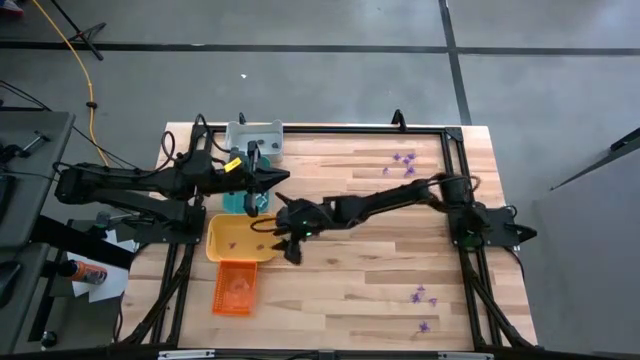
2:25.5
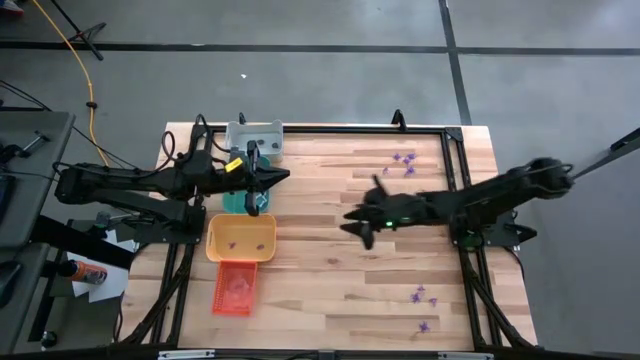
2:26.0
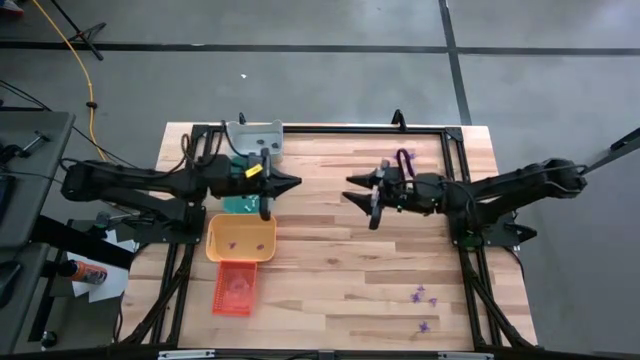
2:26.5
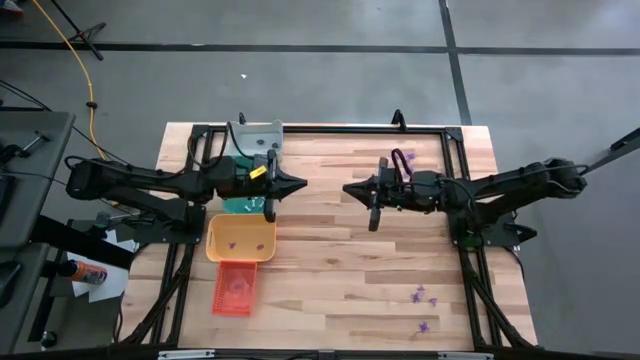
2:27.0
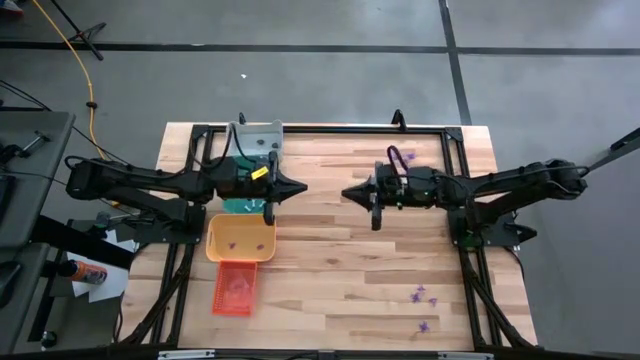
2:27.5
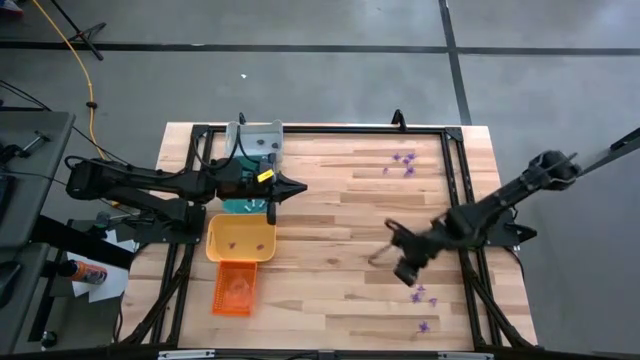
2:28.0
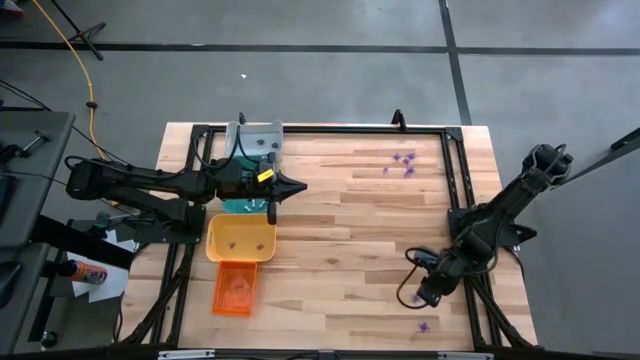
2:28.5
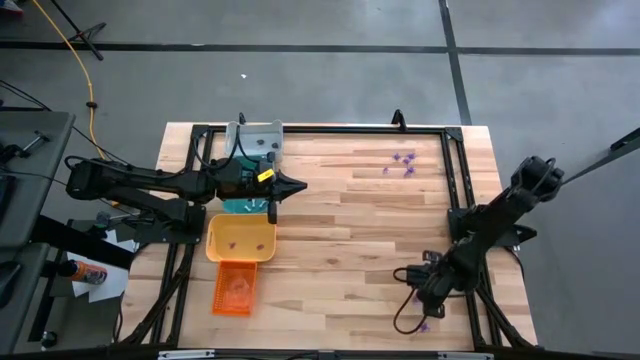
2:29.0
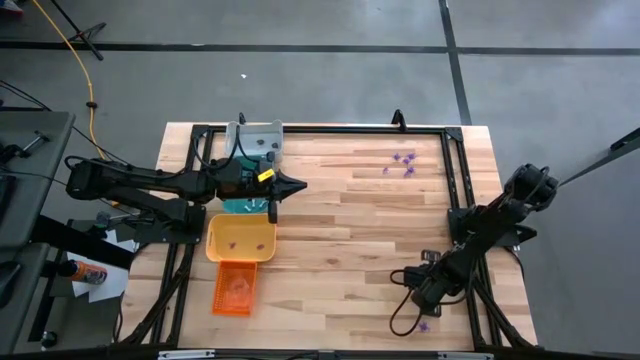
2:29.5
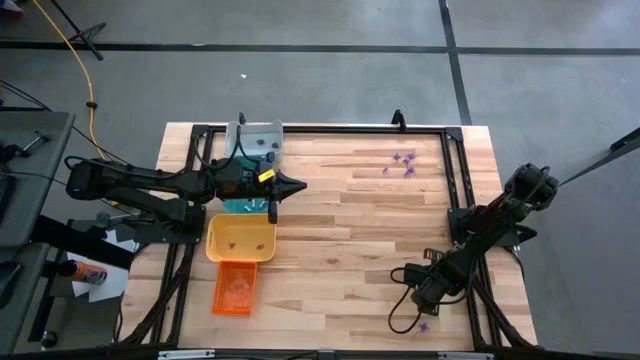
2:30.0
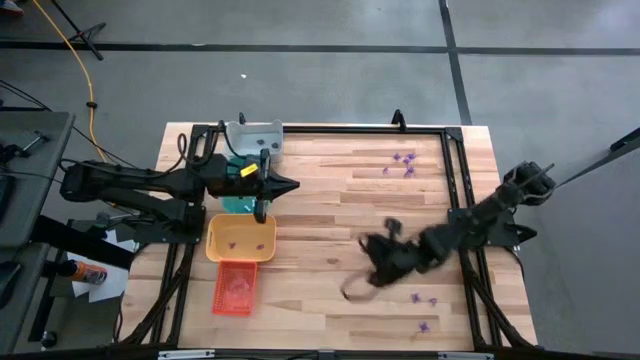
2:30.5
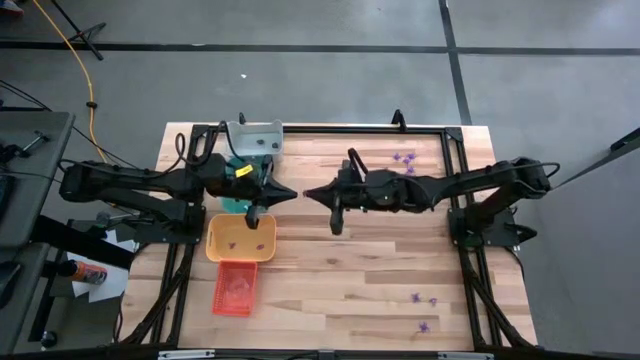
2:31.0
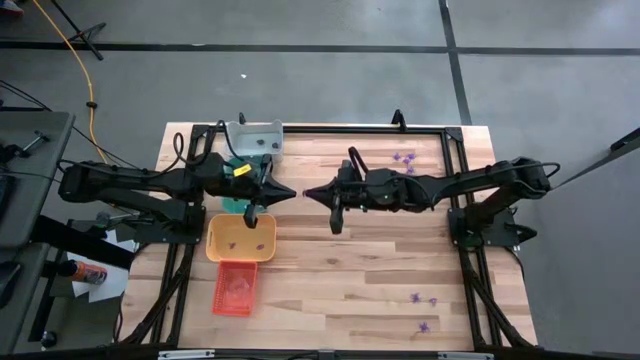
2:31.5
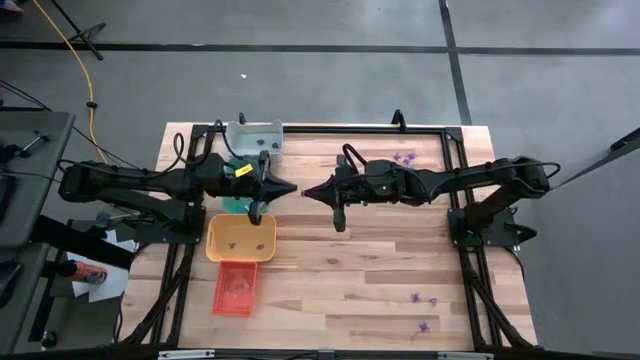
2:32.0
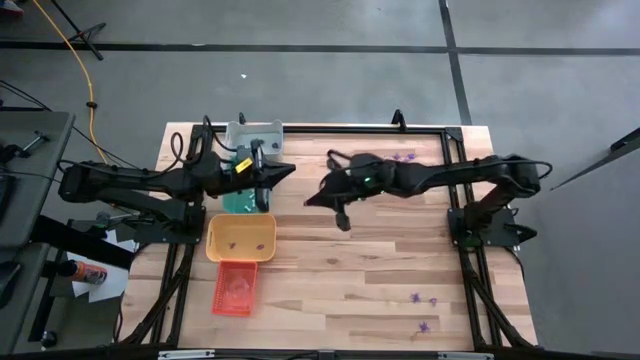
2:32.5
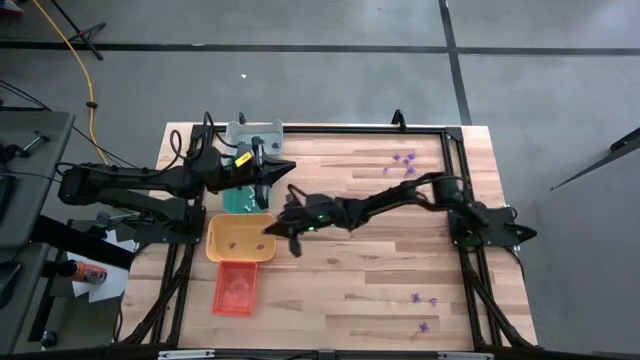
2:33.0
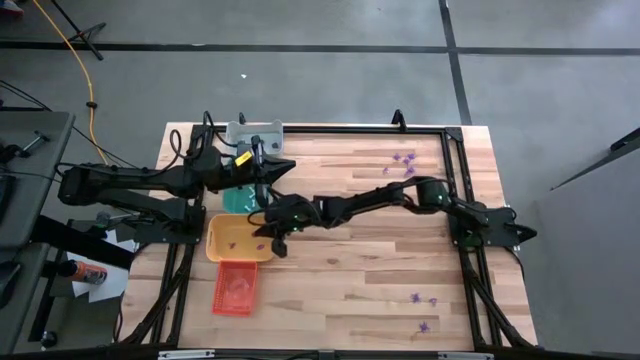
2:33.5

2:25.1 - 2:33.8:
Task: Sort Halloween decoration
Put the purple witch hat toy in the yellow bin

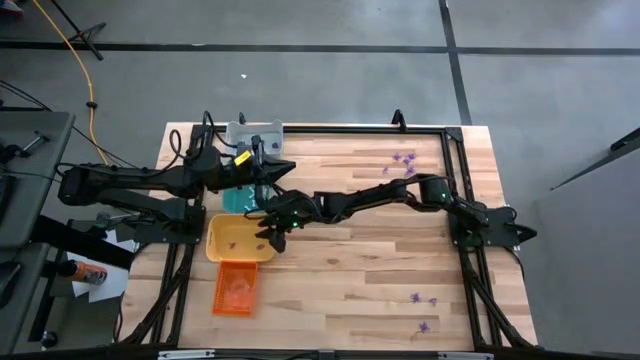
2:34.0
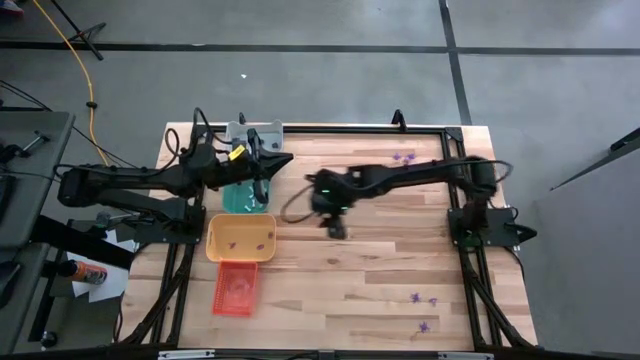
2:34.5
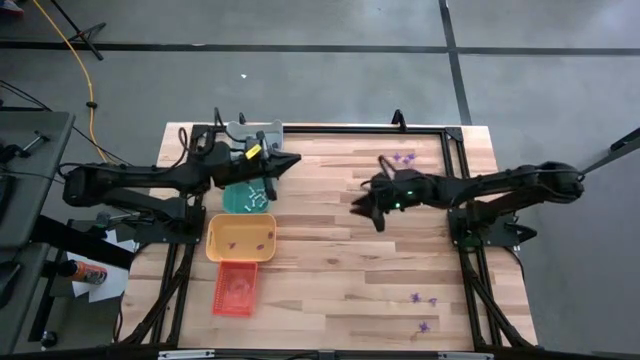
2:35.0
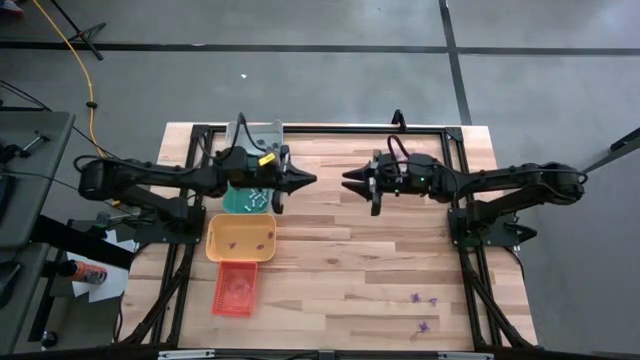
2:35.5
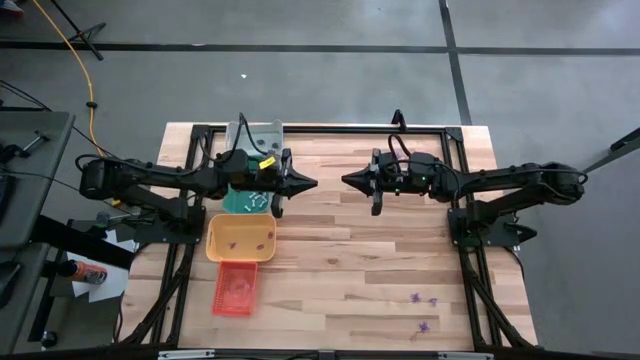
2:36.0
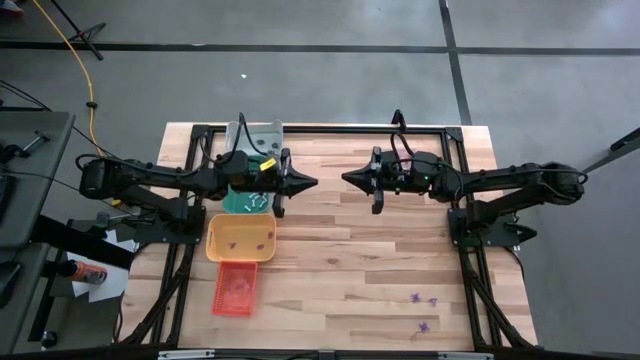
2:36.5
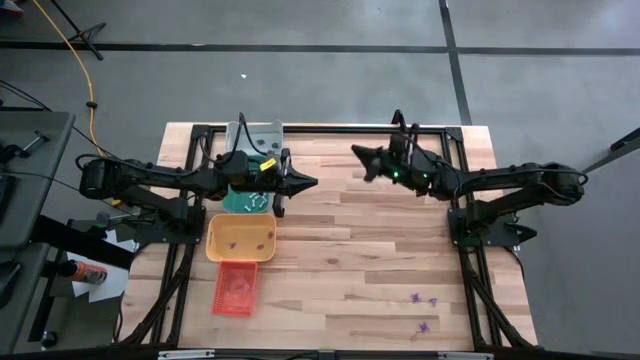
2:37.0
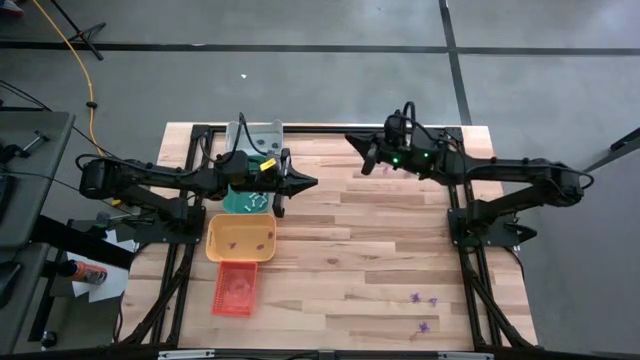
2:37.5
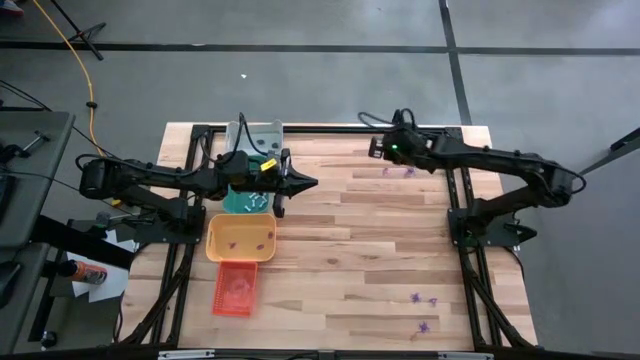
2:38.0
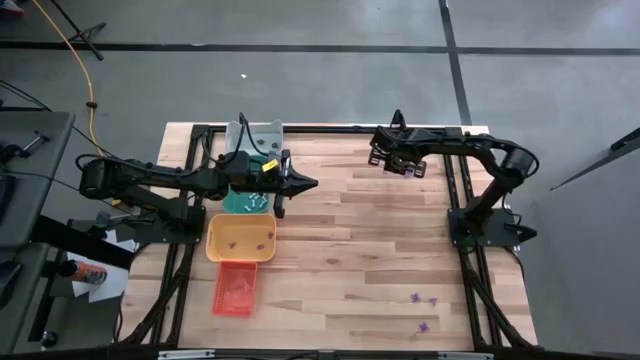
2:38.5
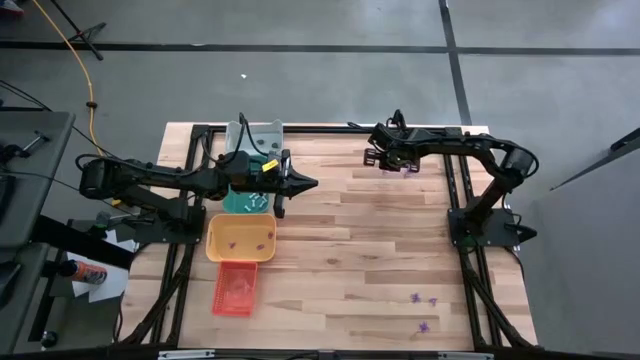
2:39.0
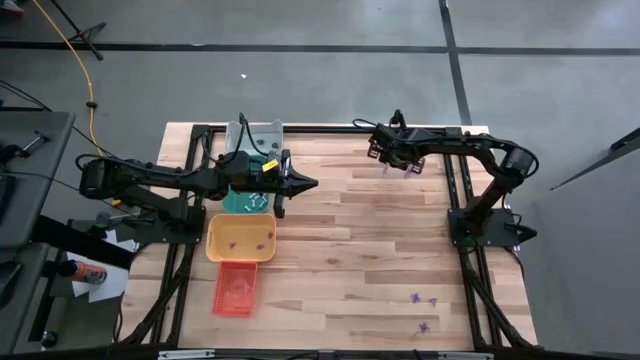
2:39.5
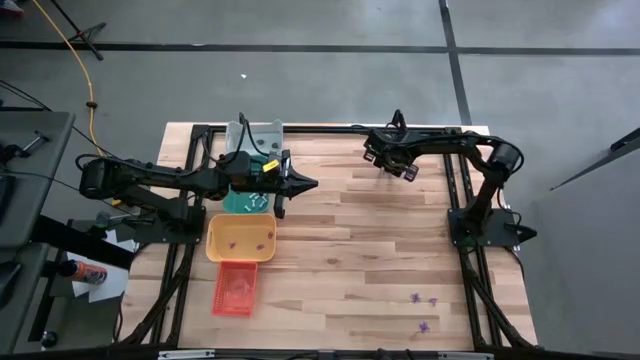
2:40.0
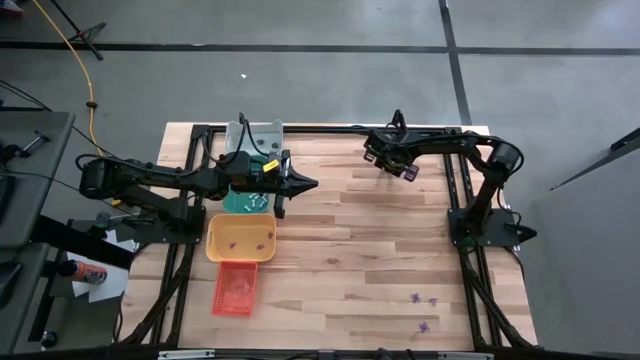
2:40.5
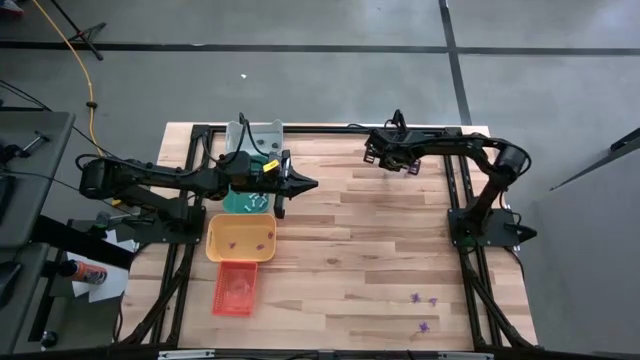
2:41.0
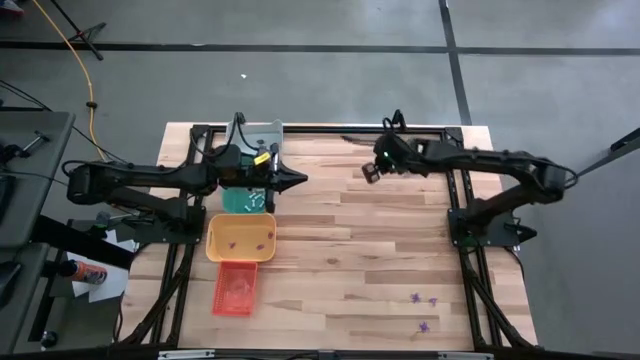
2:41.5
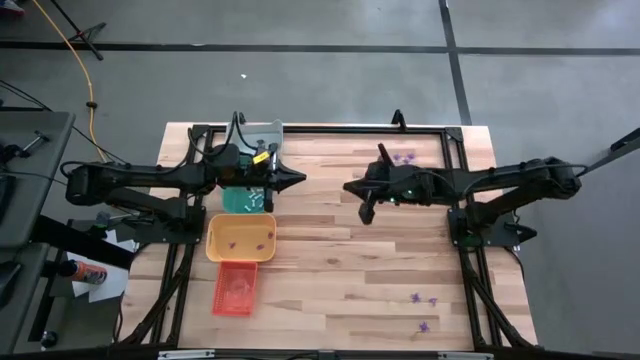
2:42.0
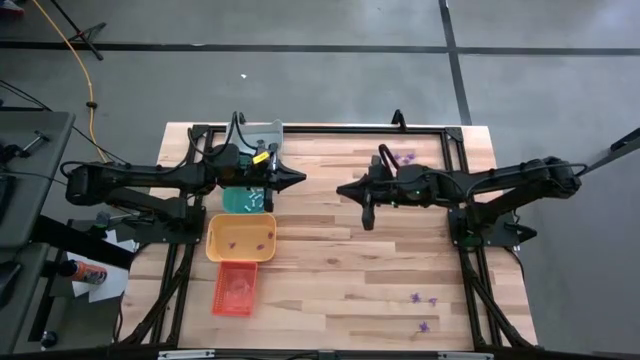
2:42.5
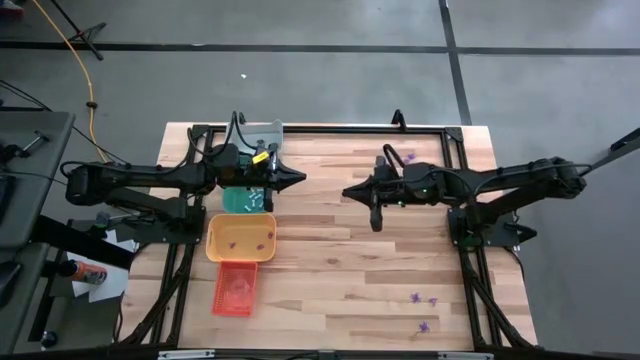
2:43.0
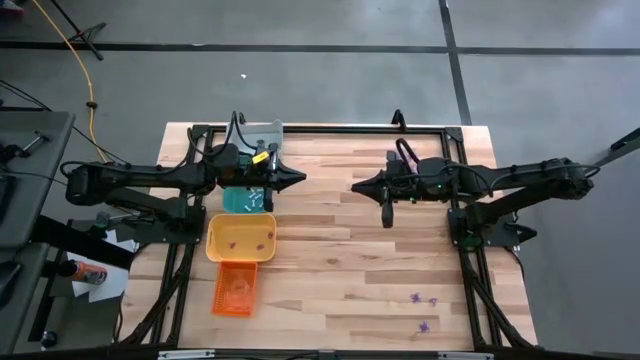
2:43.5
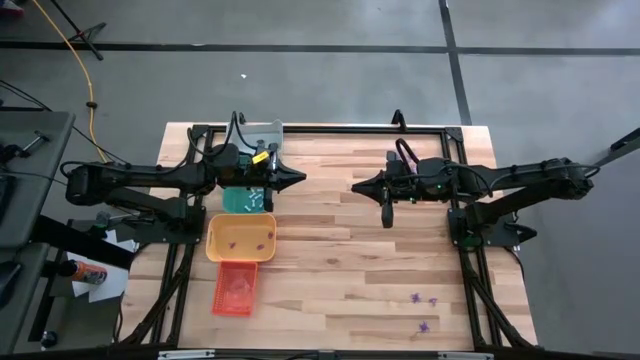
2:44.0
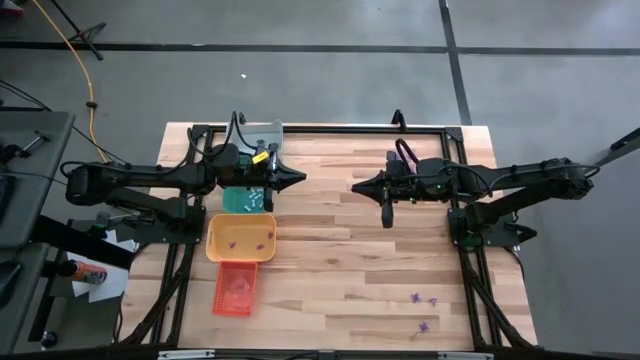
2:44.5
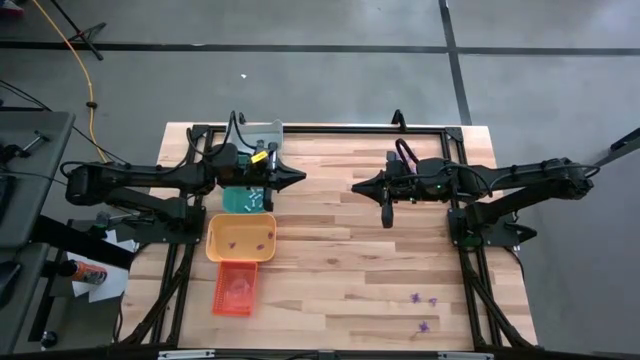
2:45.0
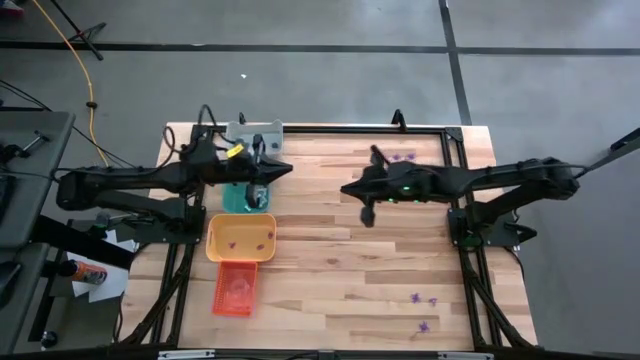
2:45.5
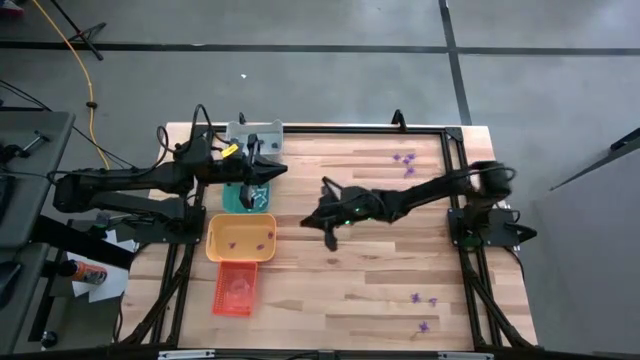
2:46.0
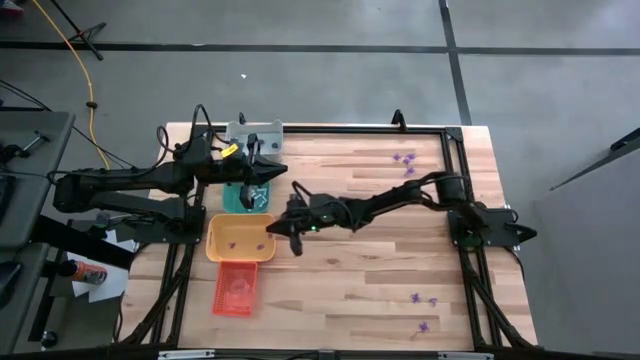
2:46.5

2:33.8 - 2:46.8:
Put the purple witch hat toy in the yellow bin
